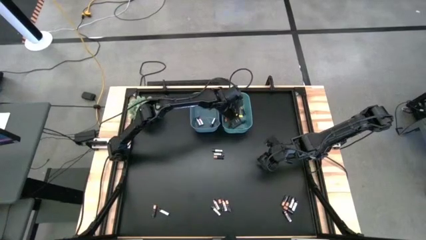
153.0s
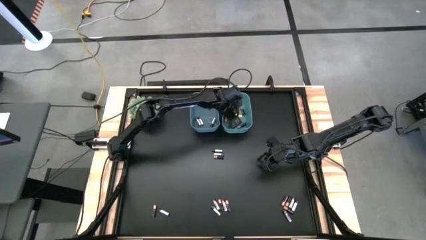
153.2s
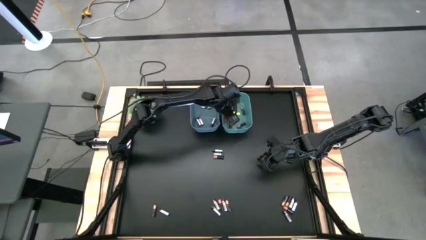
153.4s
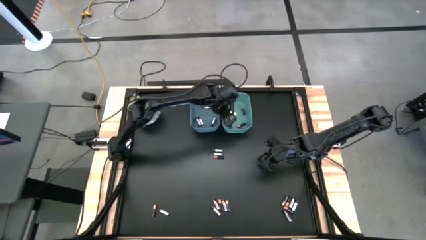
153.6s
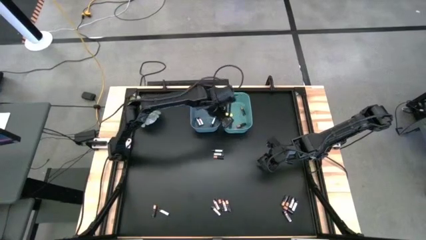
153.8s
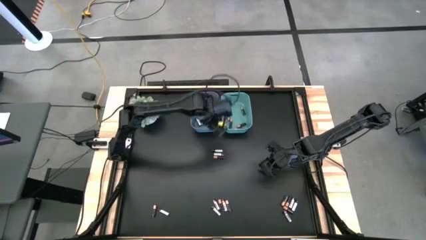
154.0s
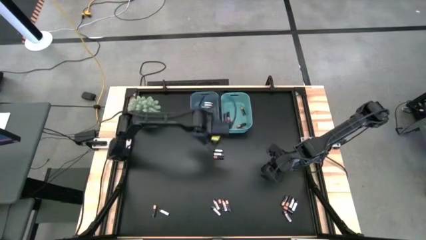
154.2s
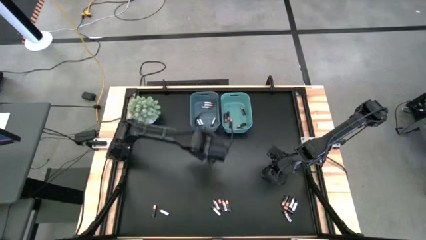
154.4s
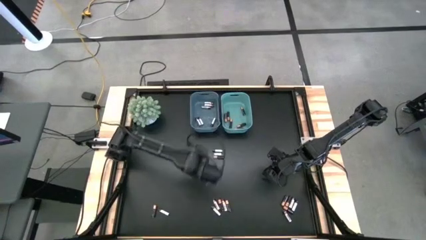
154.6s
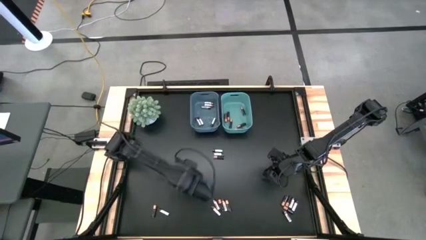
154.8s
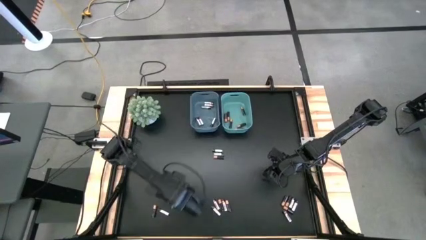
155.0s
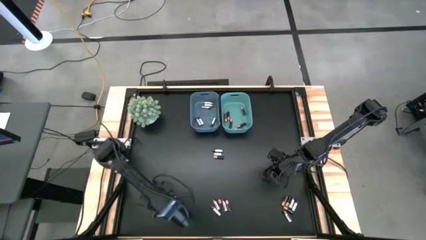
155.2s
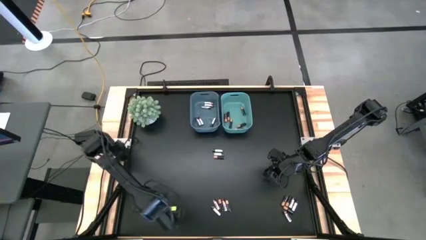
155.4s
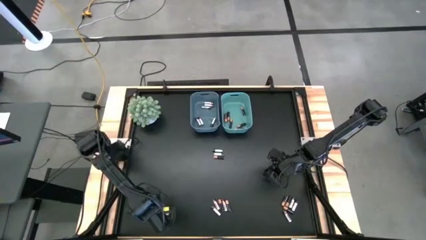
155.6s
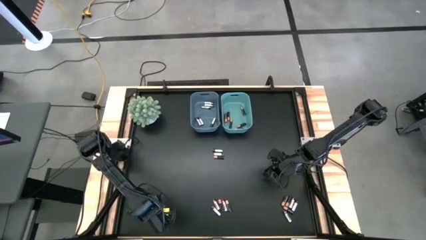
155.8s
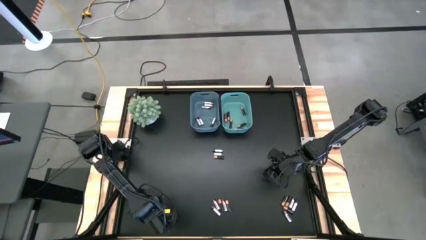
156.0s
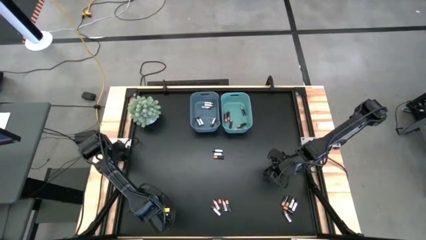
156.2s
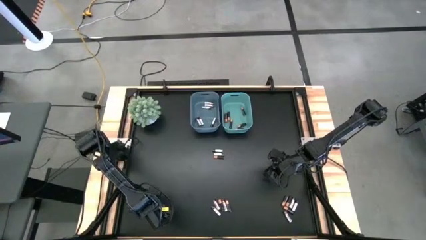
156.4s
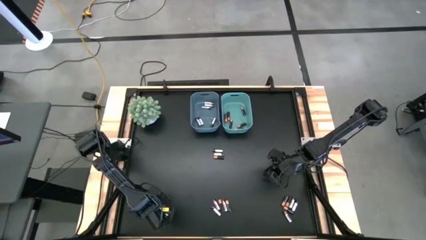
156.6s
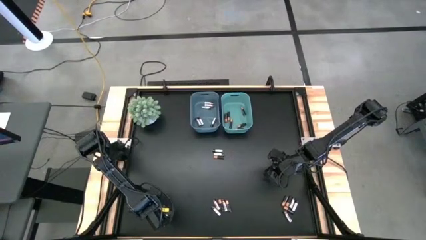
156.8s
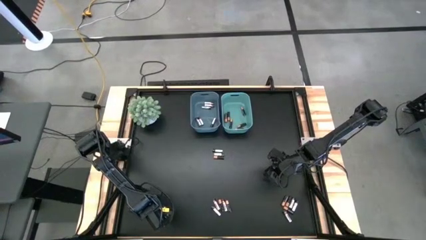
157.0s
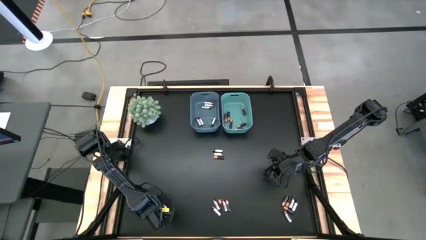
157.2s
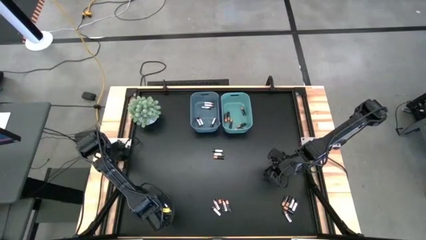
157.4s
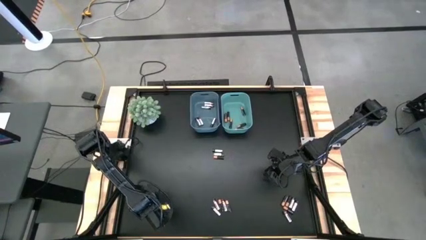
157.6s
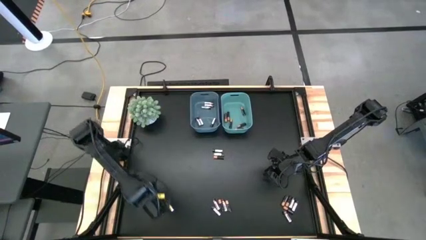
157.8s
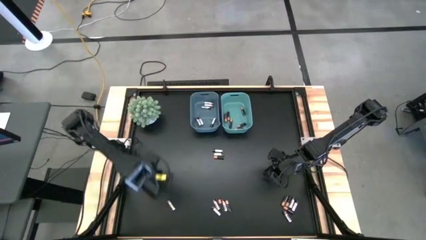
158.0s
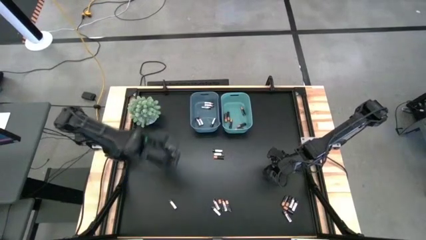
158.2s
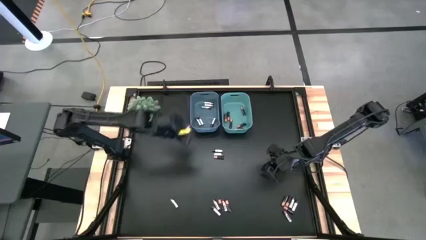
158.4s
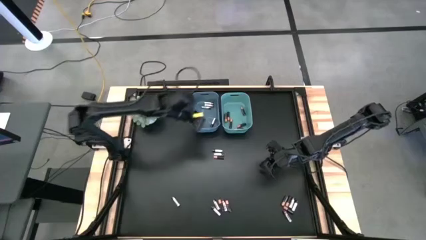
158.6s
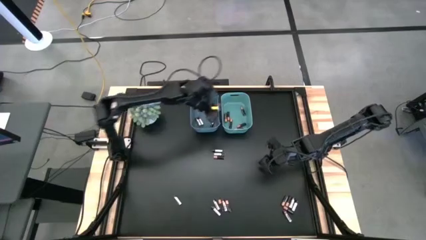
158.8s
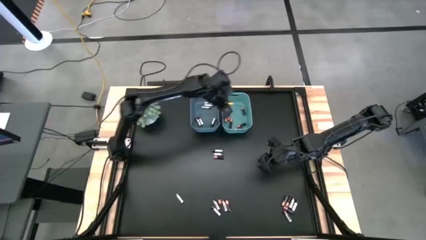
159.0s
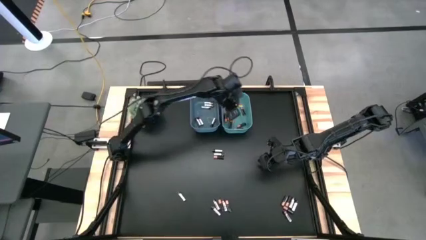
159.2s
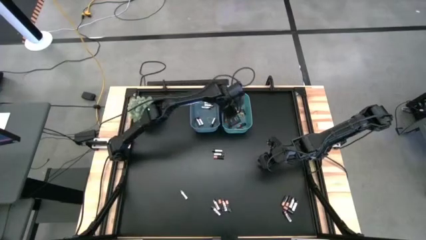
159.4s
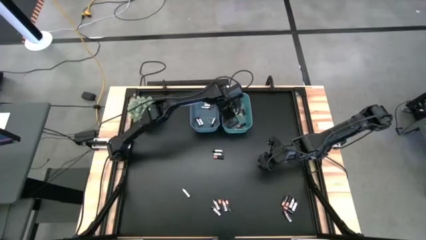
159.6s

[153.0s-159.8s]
Task: Sort batteries
Put the black battery into the green bin

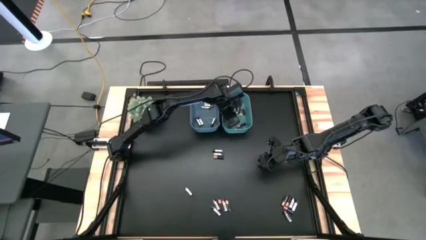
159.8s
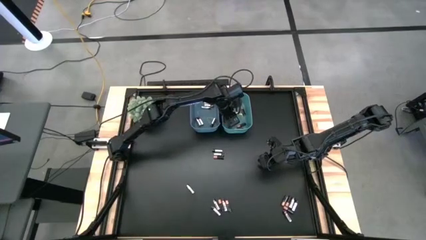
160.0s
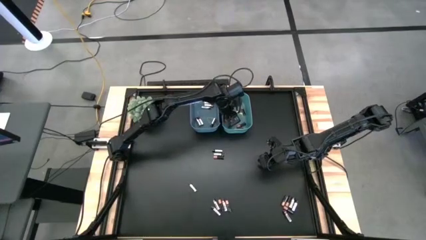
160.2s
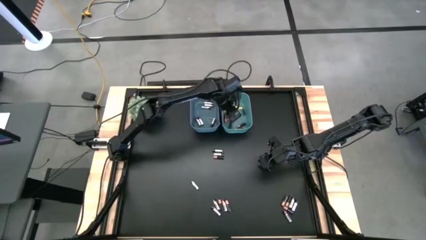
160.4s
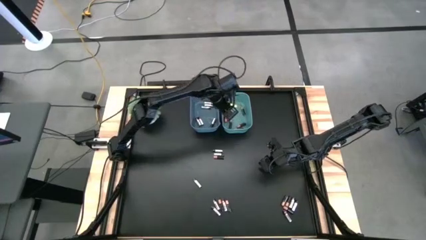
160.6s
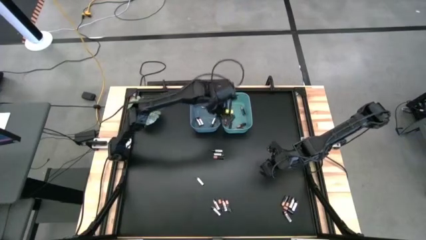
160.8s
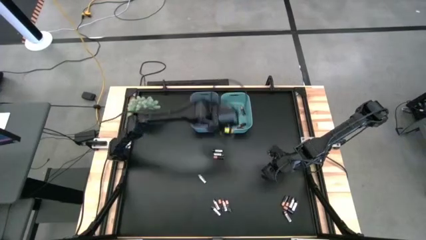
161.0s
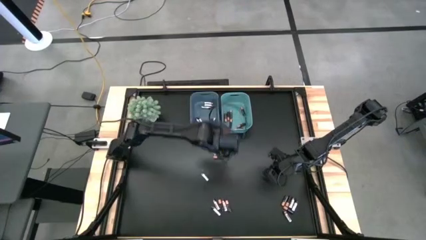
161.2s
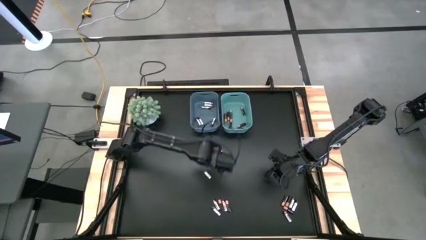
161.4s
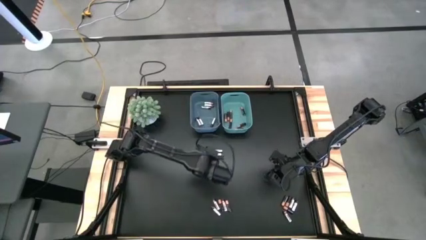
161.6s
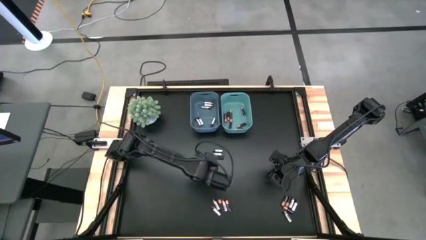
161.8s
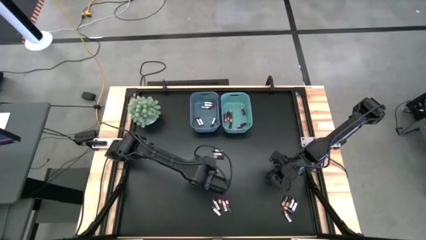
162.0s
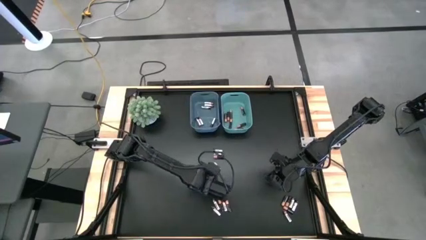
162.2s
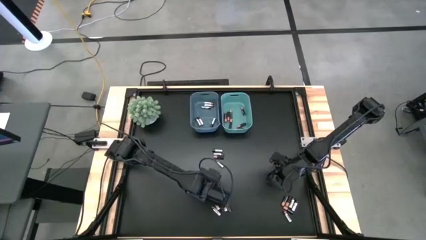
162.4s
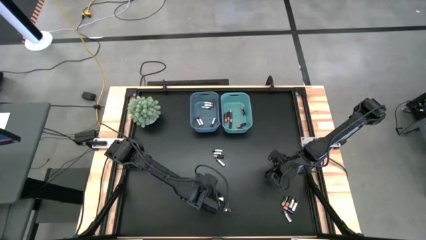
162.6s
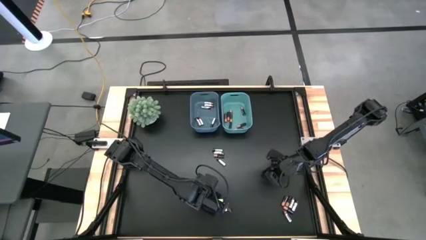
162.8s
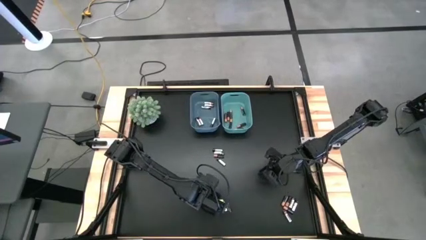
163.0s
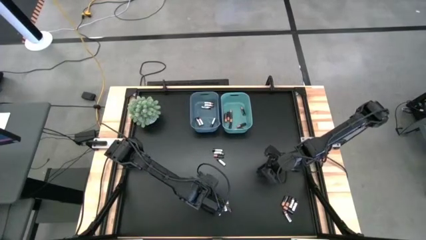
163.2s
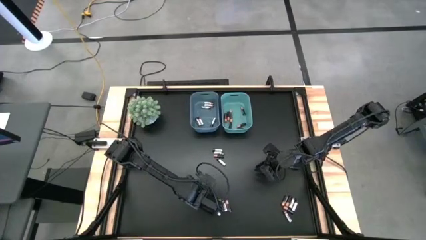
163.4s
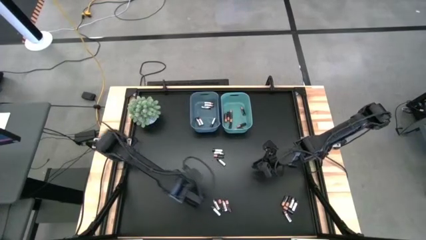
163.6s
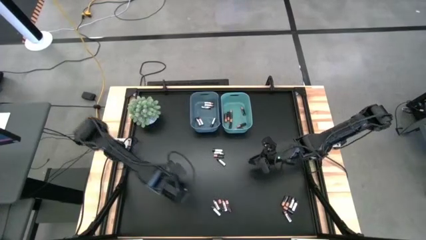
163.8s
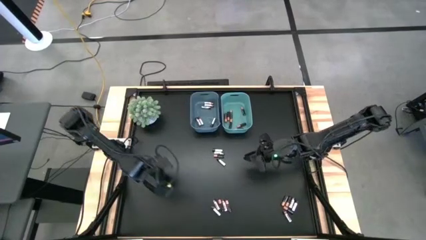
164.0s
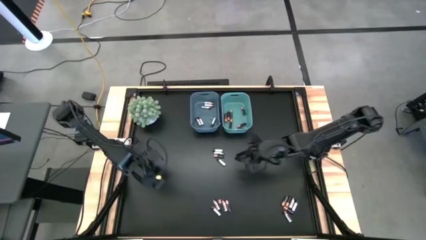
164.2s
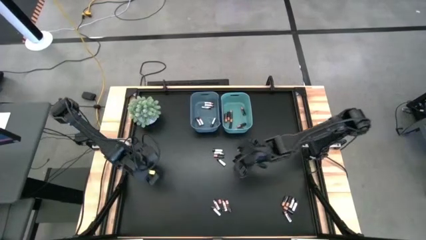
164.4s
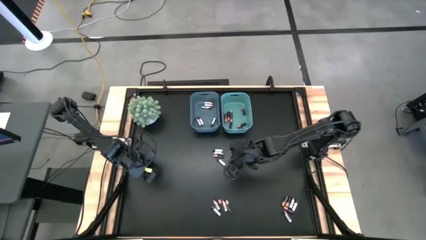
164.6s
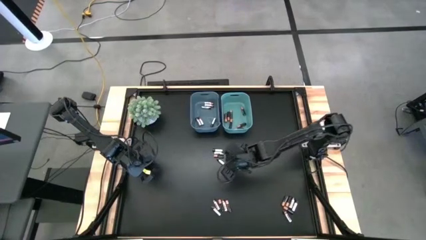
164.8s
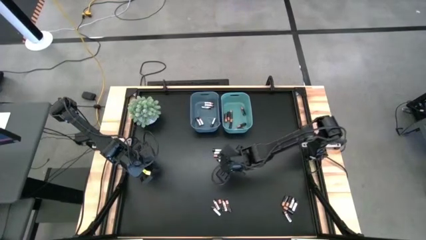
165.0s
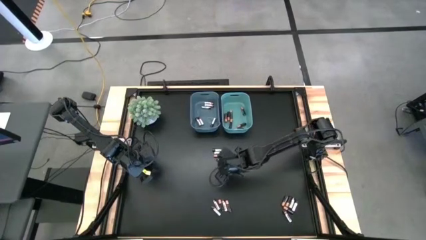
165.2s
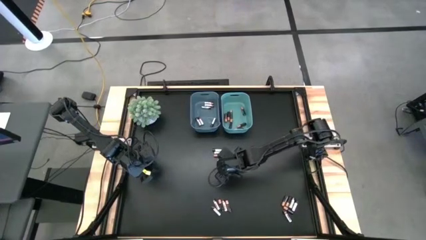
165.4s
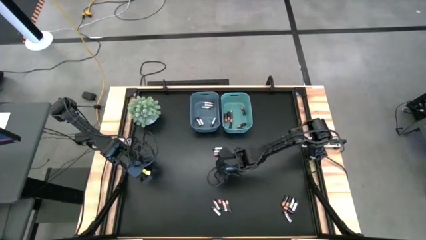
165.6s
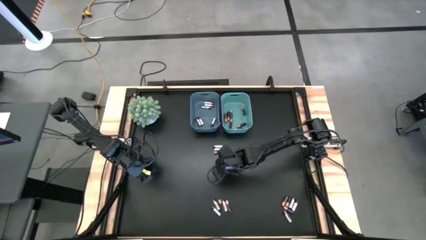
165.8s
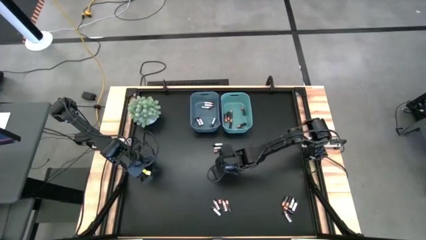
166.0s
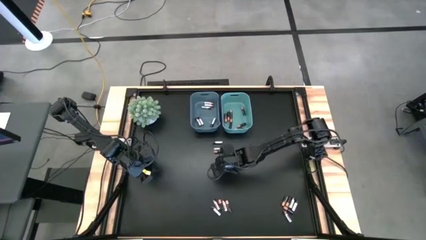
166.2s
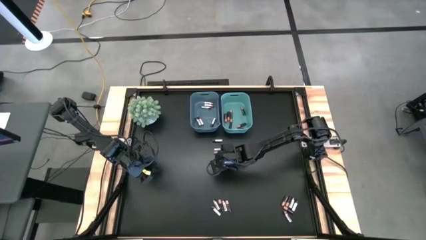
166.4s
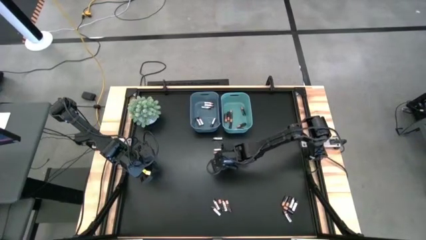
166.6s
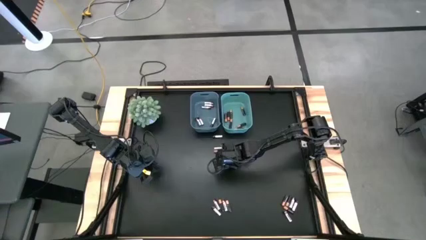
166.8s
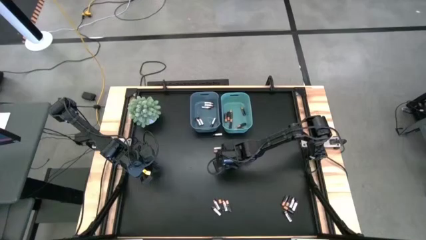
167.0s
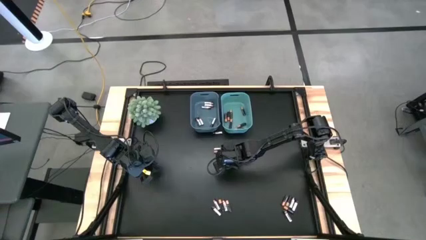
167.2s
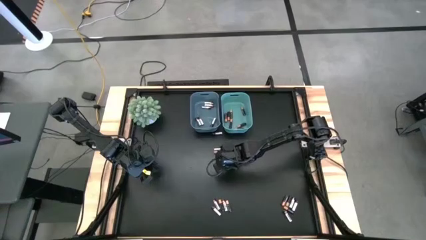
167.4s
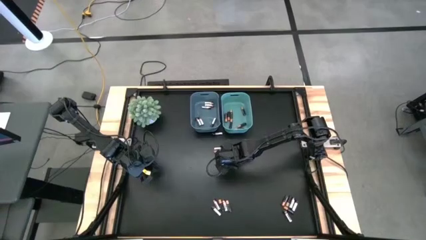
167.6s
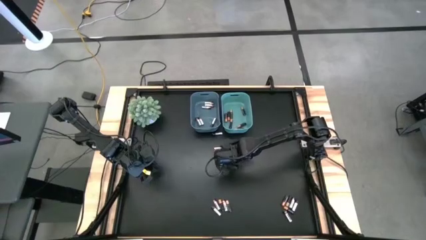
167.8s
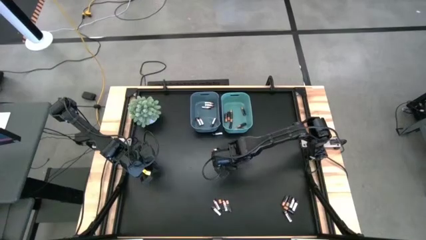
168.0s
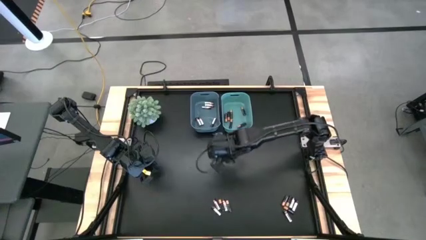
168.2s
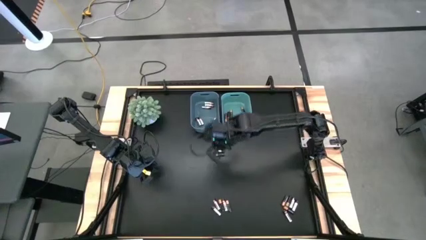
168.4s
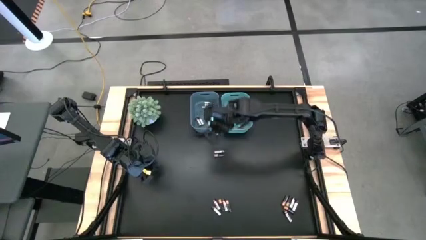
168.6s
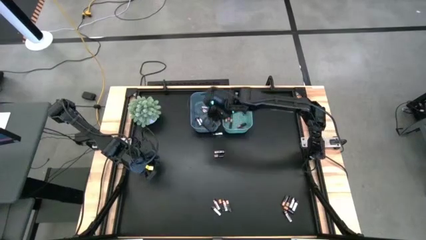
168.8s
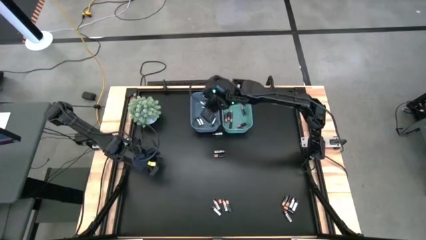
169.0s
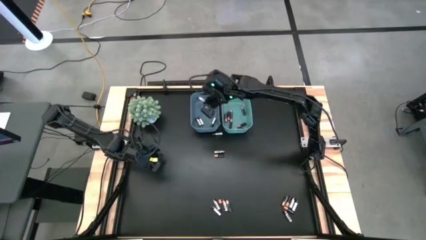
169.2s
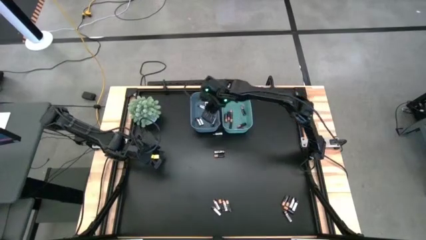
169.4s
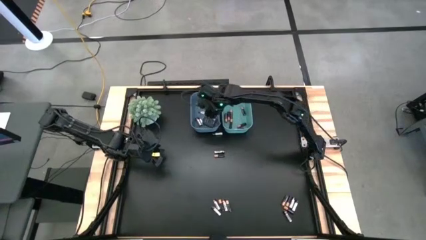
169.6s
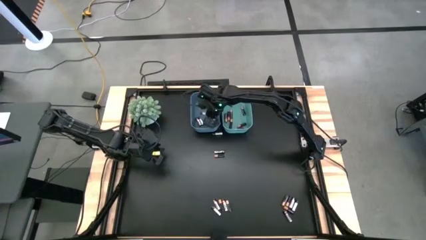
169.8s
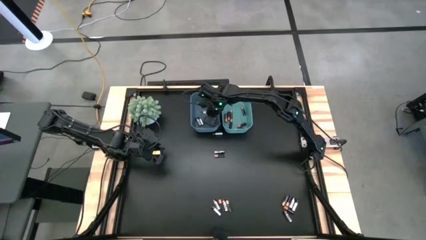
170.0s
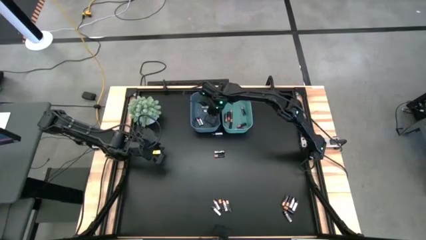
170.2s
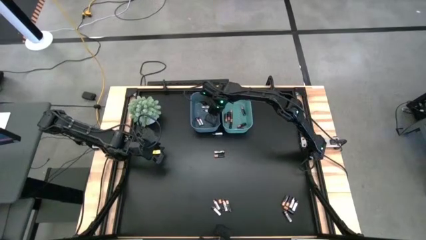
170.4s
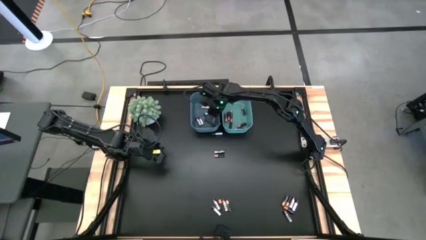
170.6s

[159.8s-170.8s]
Put the silver battery into the blue bin
